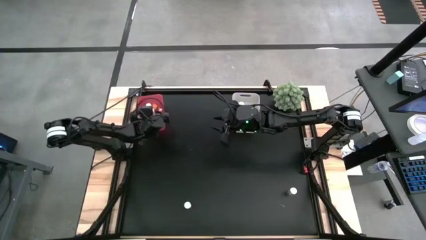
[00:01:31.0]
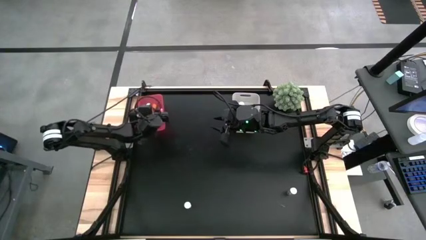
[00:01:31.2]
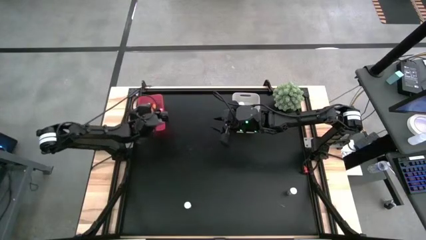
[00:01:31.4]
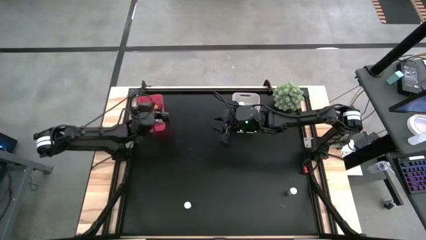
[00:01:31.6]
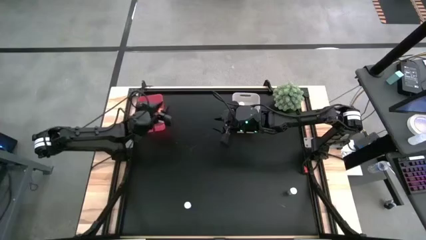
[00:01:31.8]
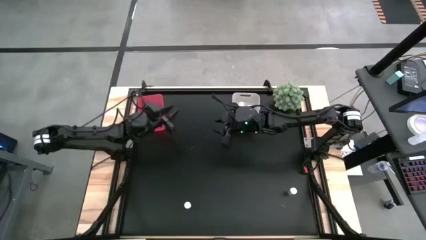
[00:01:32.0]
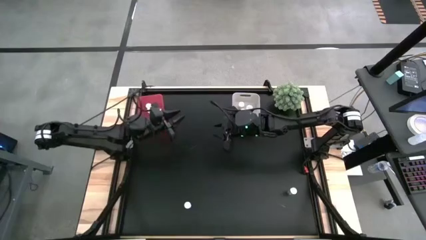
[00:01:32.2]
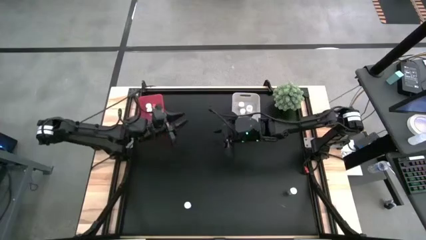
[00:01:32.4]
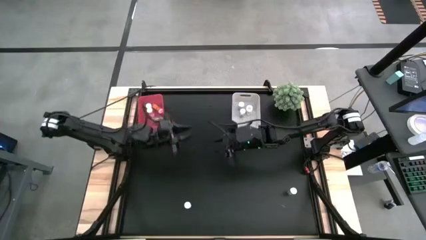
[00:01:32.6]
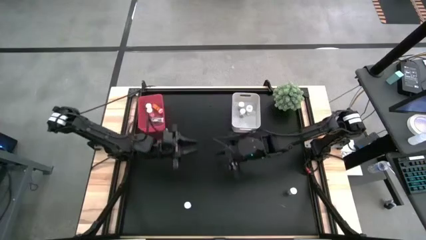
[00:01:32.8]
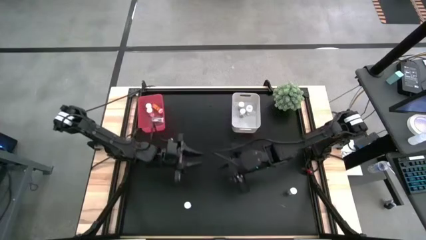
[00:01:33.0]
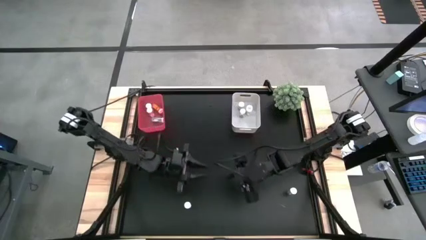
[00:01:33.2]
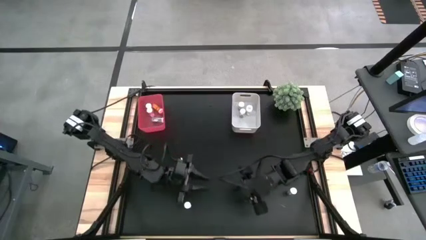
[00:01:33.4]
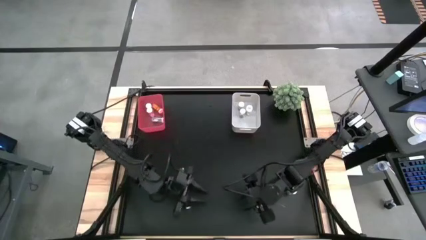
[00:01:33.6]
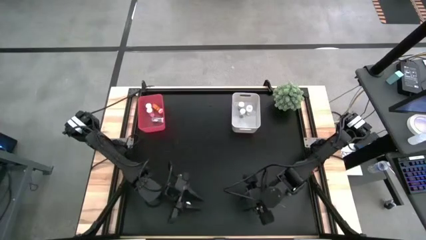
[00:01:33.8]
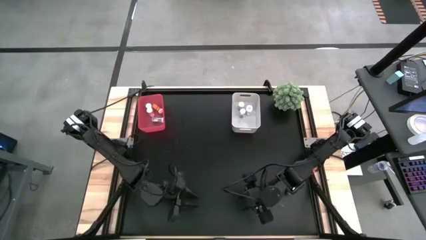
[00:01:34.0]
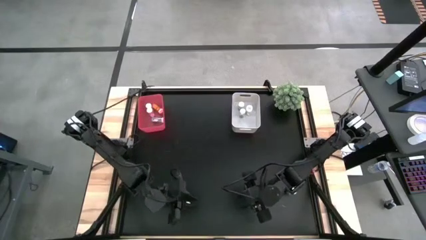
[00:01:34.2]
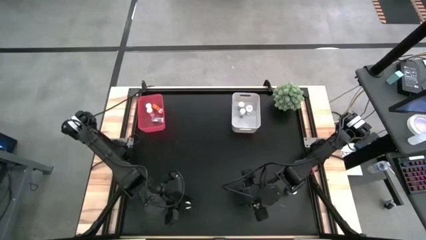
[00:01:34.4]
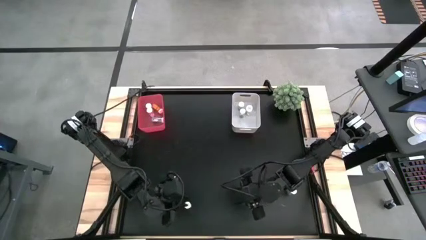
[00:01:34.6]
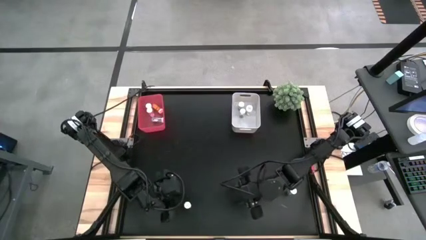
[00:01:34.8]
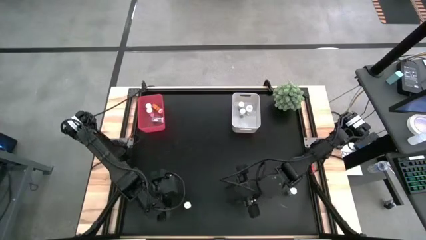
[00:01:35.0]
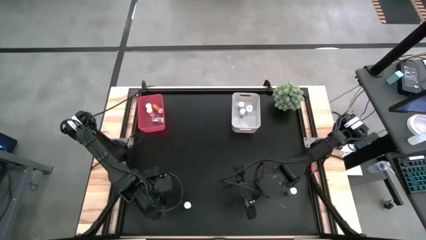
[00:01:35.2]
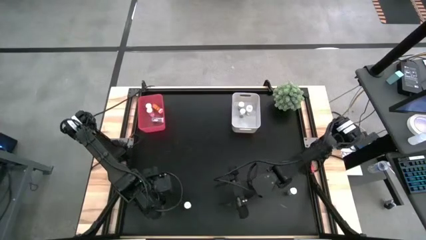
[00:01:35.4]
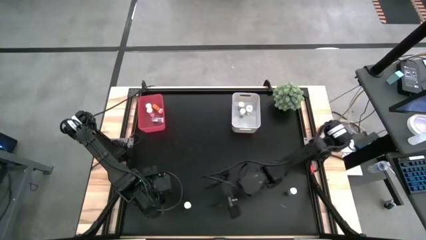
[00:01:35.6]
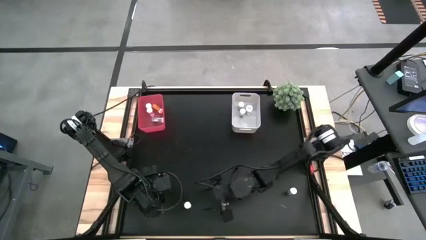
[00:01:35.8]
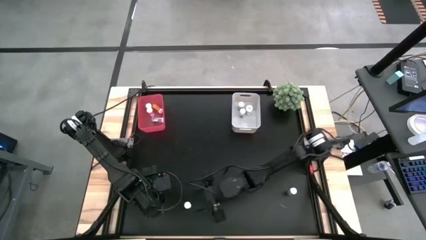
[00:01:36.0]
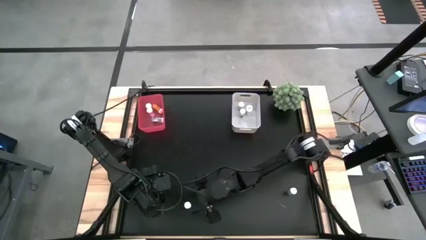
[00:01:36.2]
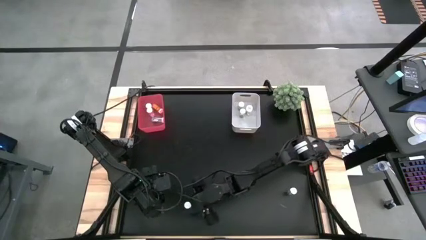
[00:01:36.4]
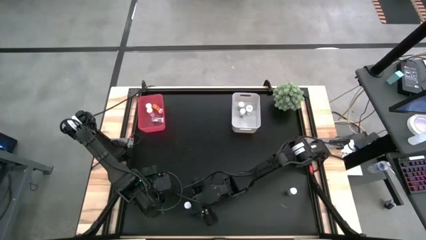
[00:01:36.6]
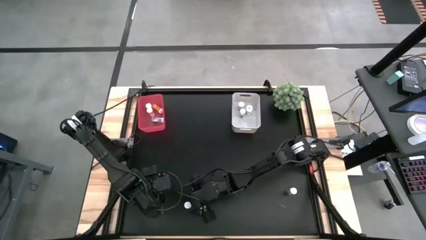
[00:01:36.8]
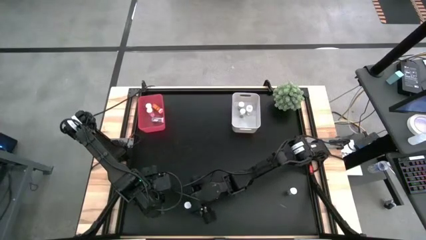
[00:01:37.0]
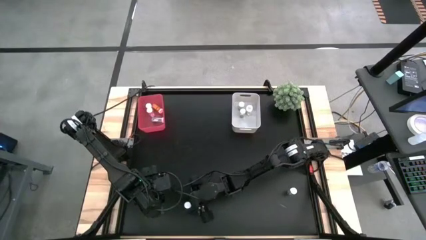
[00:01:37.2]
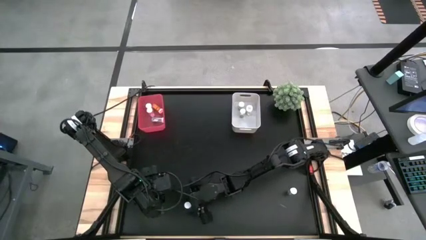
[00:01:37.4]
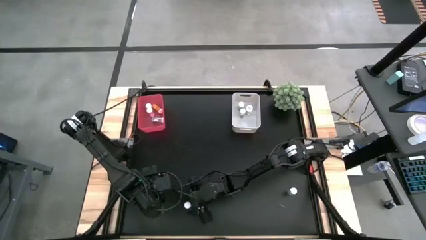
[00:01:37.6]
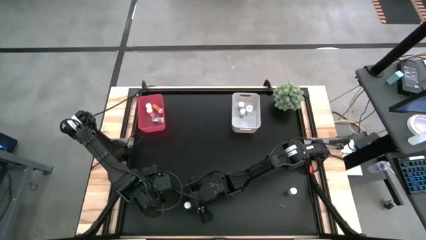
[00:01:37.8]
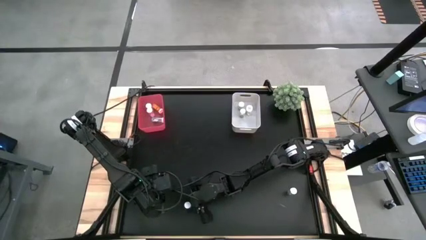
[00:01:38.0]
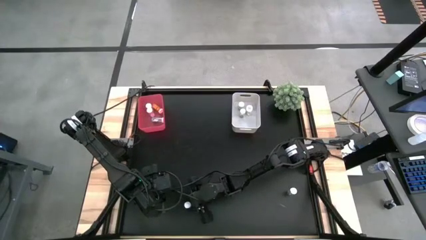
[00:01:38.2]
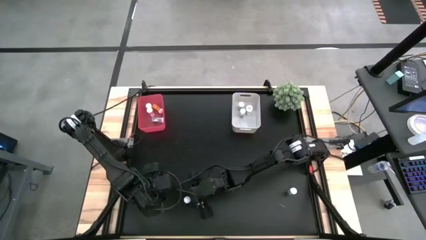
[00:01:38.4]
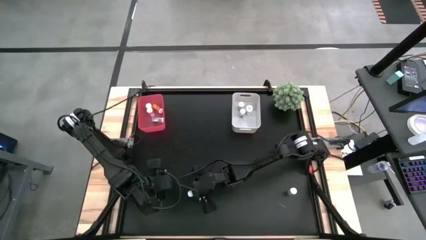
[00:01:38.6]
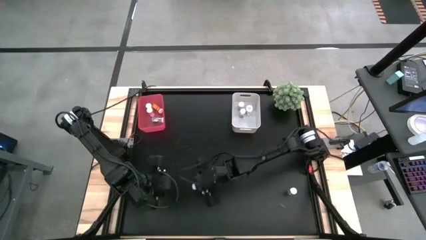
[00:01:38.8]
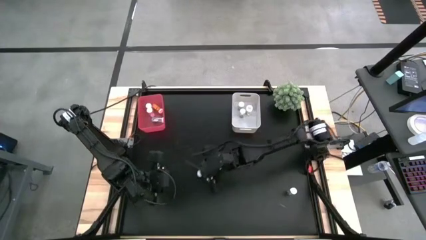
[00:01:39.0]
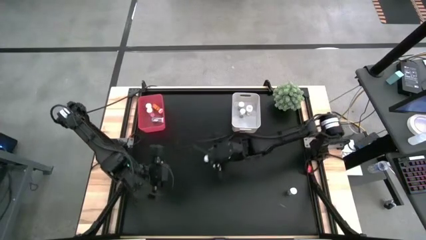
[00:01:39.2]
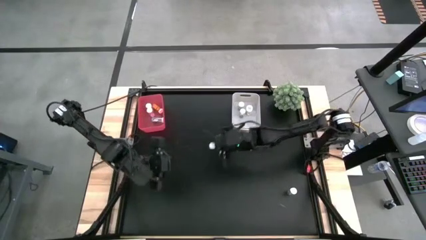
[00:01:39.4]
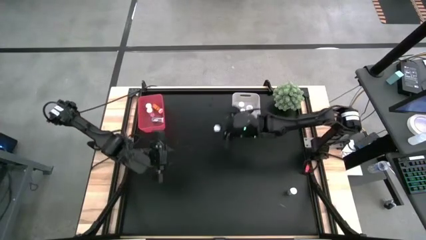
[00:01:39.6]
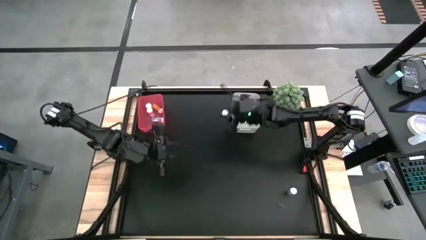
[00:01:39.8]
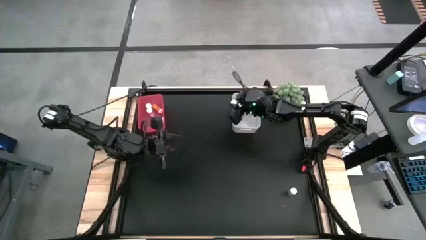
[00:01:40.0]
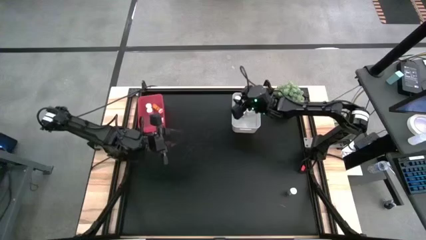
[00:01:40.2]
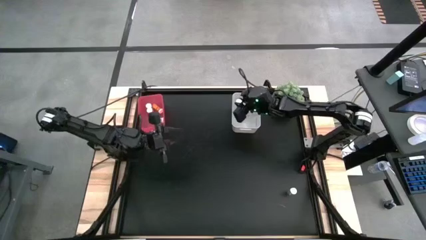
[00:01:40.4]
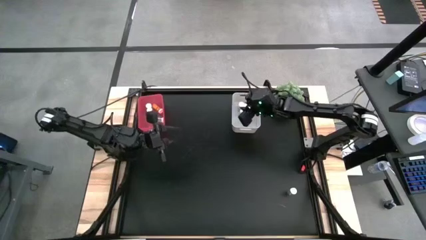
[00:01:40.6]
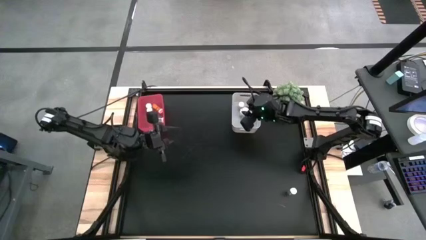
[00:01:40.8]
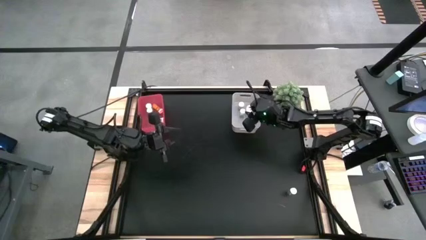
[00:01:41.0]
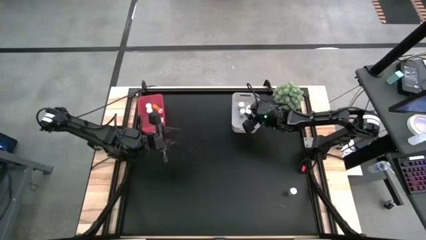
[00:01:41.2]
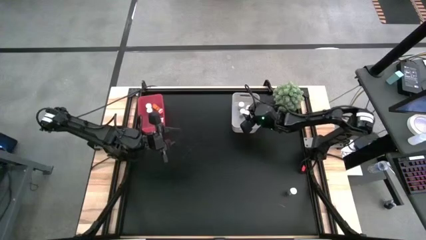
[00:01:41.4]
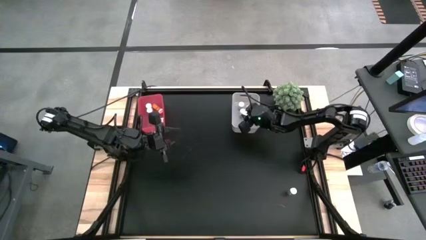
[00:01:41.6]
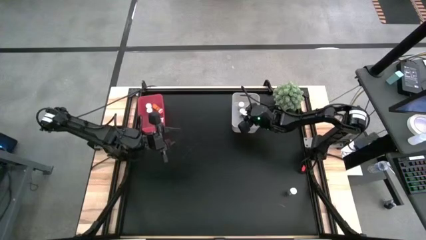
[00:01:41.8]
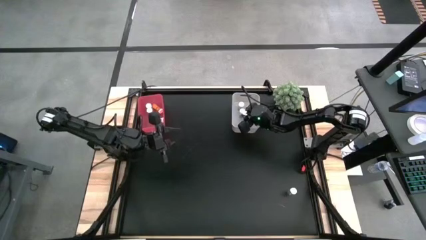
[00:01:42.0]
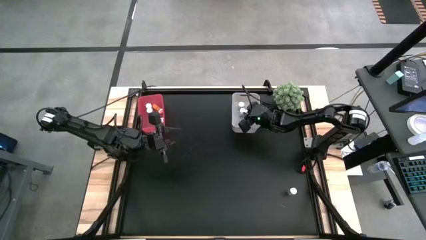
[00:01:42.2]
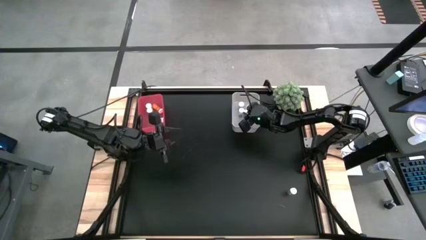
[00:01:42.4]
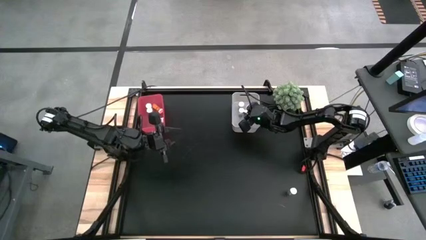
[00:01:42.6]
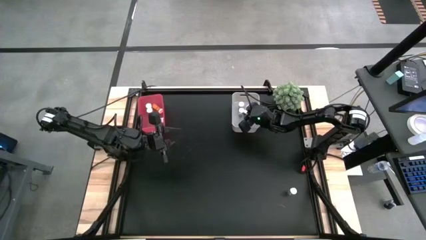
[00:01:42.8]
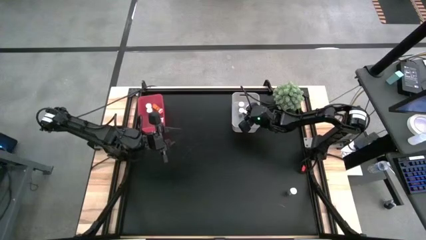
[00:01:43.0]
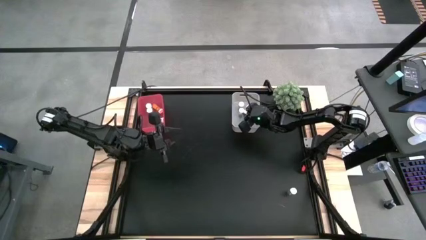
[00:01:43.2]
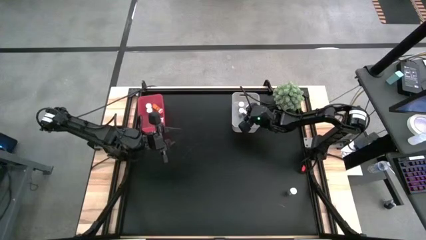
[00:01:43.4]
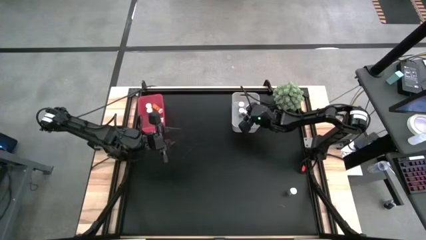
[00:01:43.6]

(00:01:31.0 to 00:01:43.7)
Task: Pick and place medicine bottles into bin by pill shape (circle, oval)
Put the blue capsule bottle into the white bin

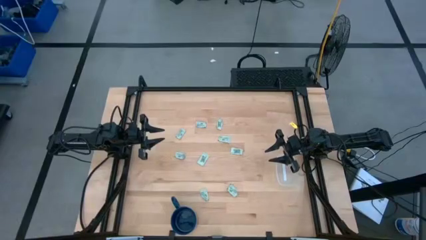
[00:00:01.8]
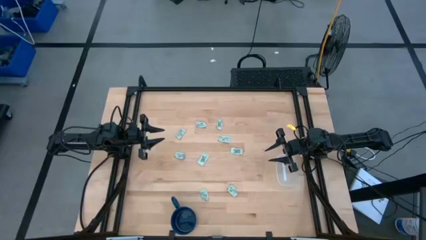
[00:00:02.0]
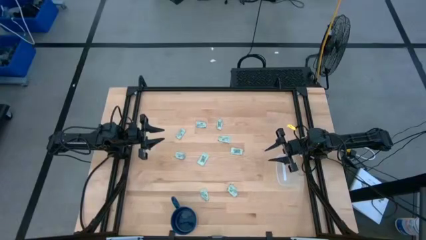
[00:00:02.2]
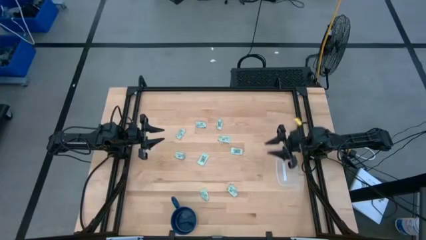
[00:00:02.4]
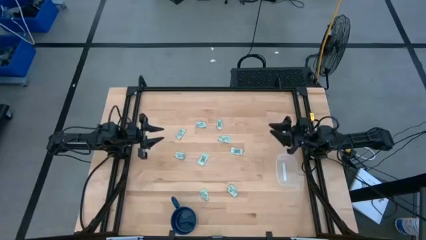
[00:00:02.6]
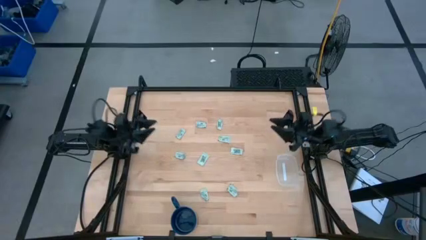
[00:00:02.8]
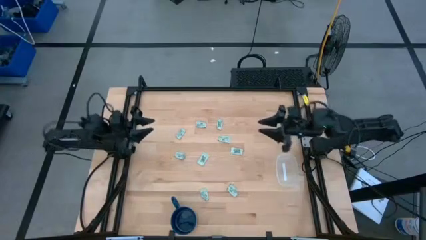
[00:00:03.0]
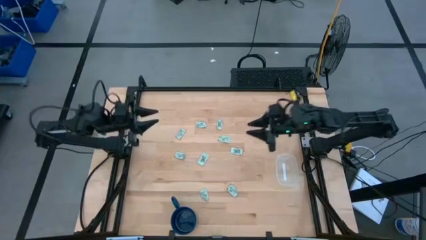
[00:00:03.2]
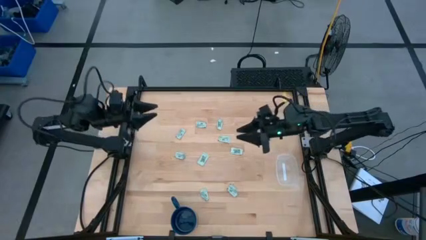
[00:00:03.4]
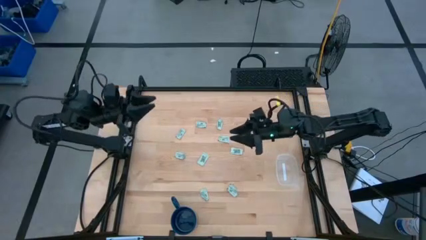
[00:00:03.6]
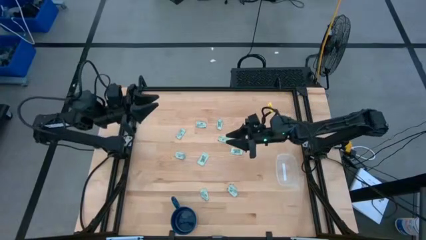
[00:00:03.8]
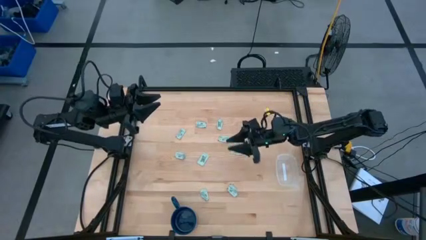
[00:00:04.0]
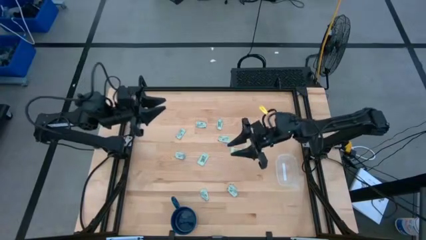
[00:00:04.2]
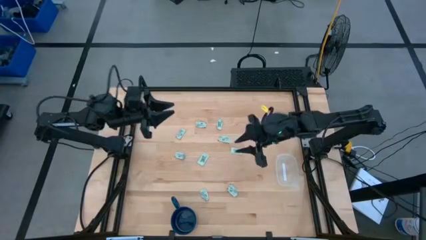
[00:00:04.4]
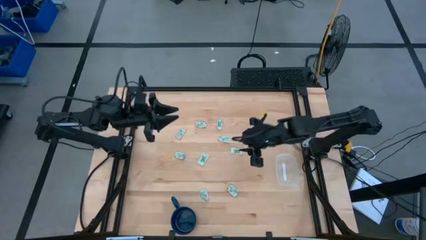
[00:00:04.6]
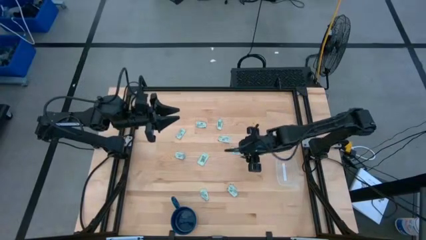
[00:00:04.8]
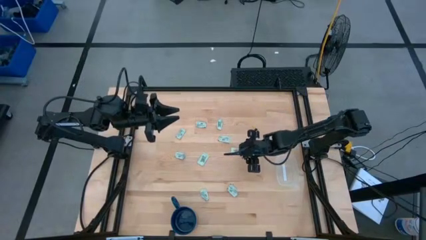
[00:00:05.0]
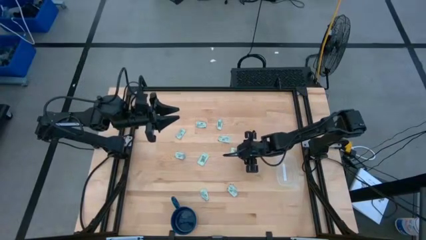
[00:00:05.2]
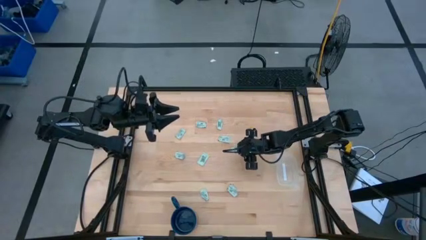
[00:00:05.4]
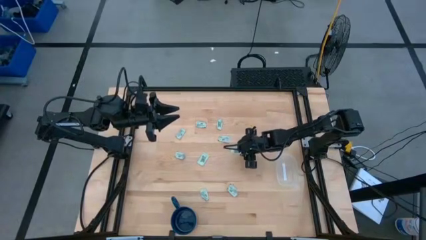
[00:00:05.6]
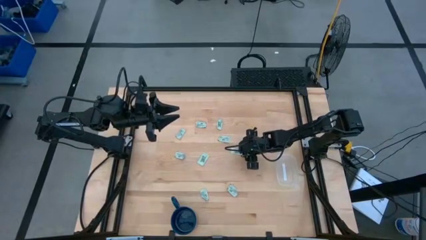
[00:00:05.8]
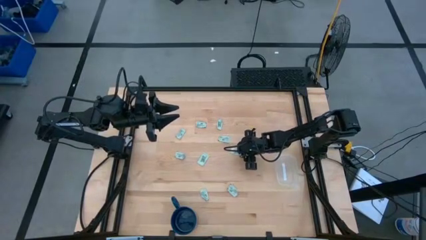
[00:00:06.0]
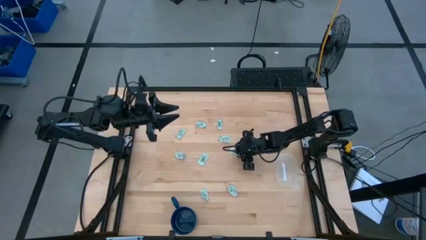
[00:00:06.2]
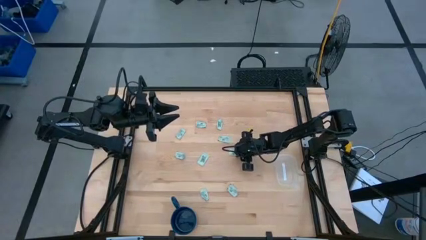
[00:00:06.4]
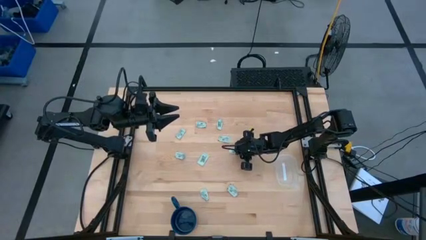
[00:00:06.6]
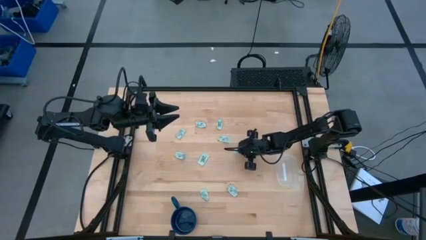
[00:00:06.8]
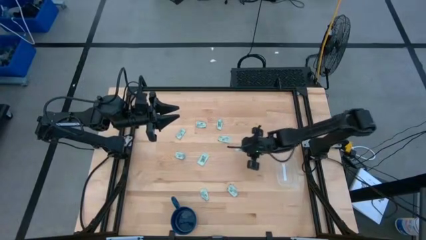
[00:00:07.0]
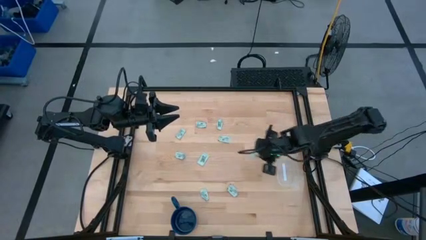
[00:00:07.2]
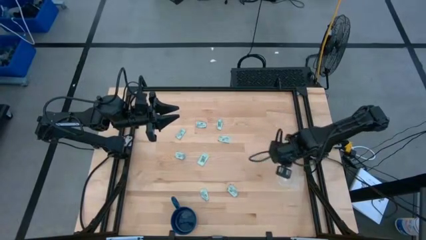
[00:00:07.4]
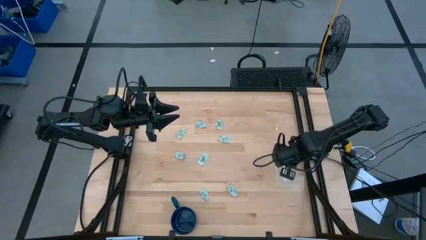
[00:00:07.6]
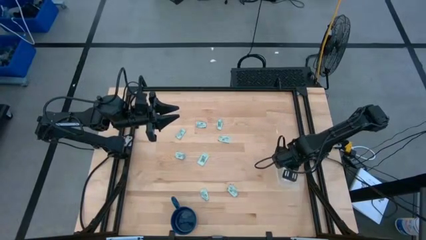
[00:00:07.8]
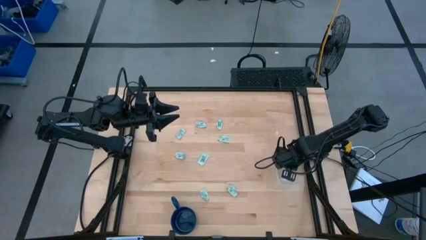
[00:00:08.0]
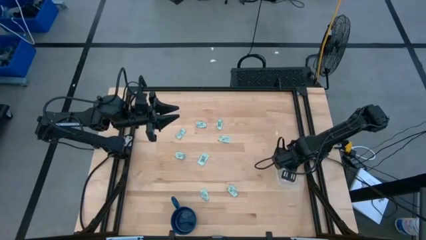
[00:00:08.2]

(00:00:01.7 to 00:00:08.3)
Task: Pick and place Stevia / Truvia into bins
Put the green stevia packet into the transparent container
